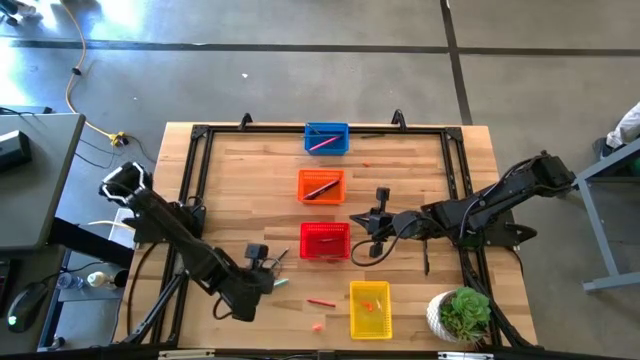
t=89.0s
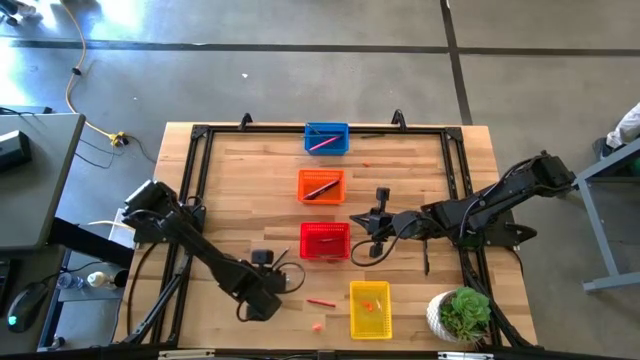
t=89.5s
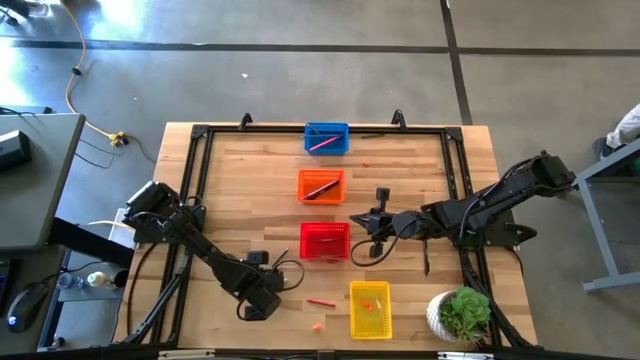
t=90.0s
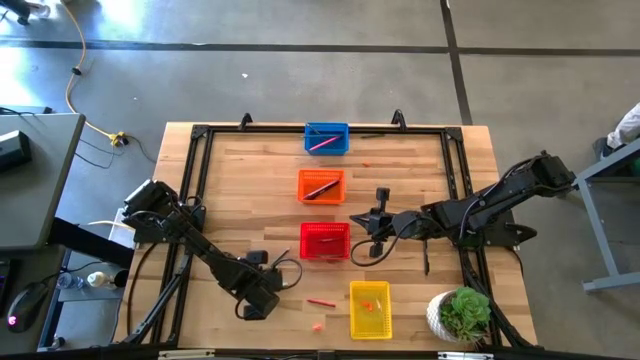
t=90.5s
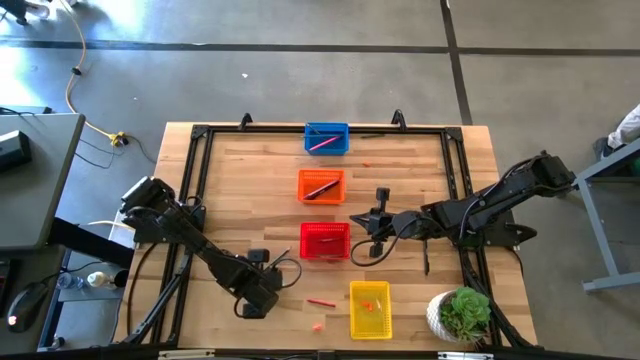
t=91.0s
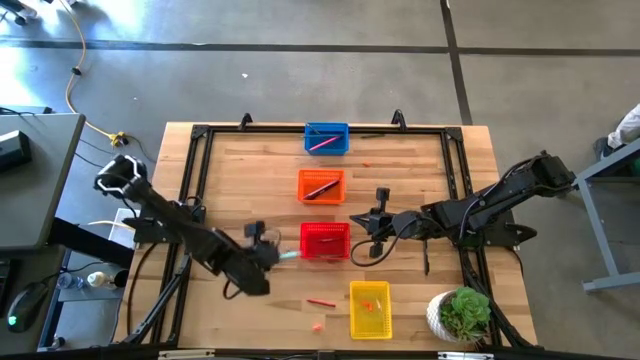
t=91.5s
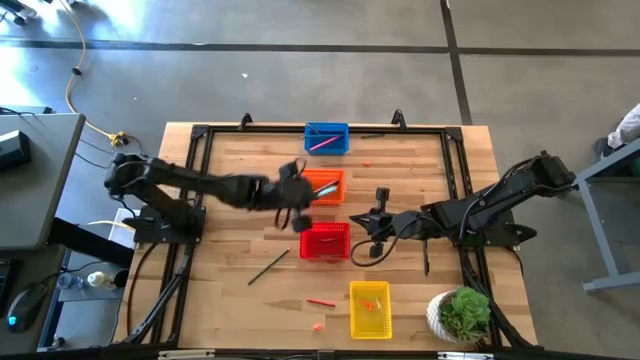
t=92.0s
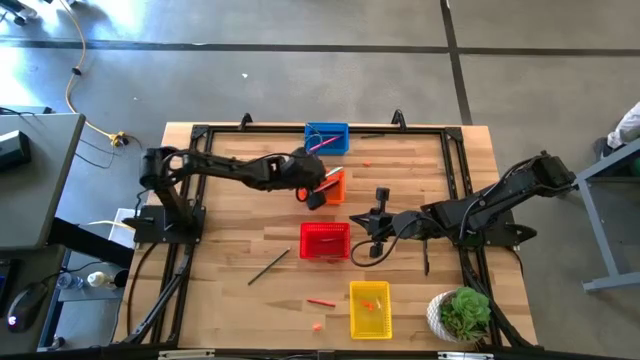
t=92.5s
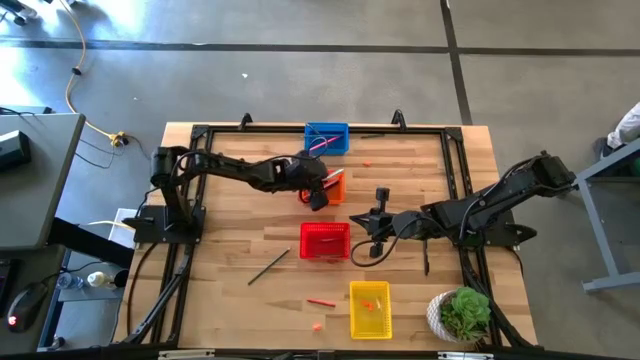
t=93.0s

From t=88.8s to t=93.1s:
Task: Sort crayons/erasers/pens/pencils in bins
Put the blue pen into the orange bin

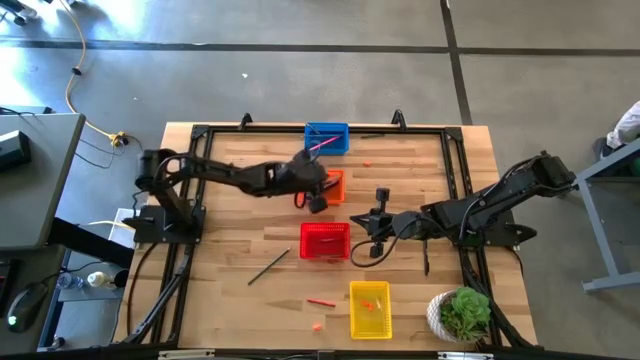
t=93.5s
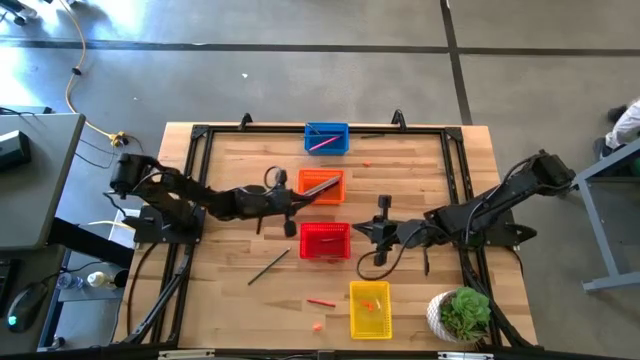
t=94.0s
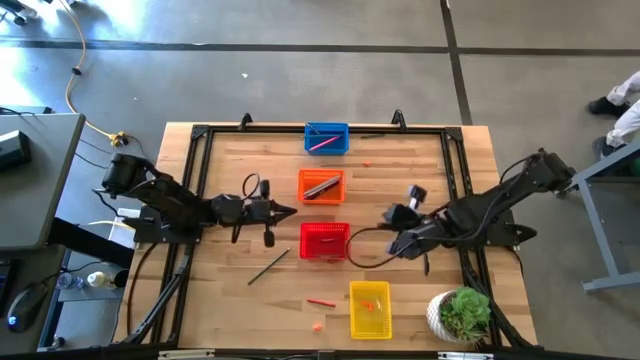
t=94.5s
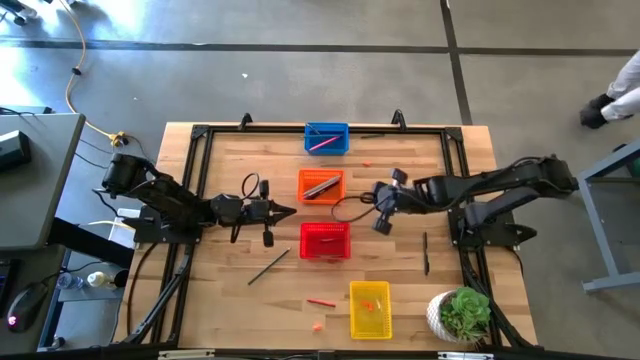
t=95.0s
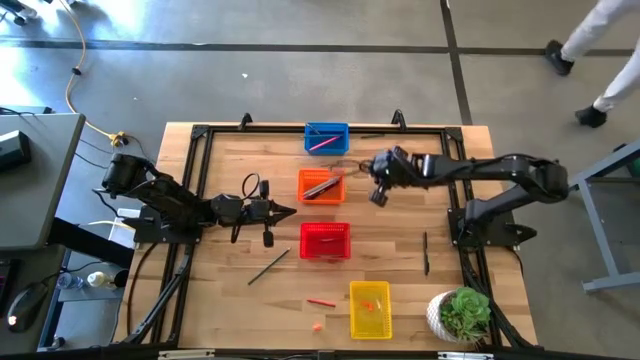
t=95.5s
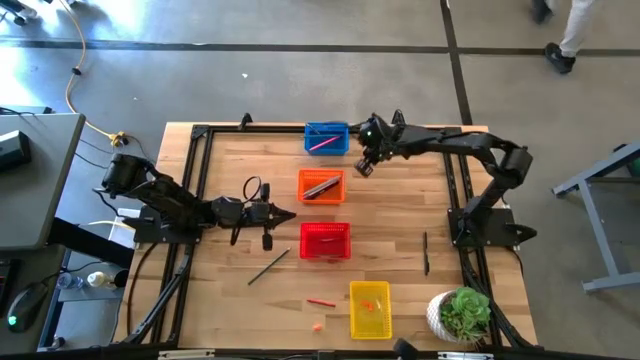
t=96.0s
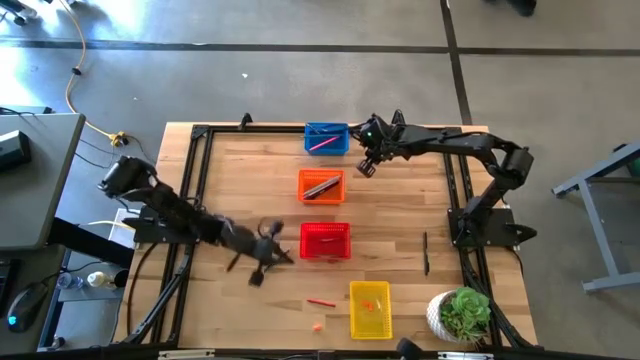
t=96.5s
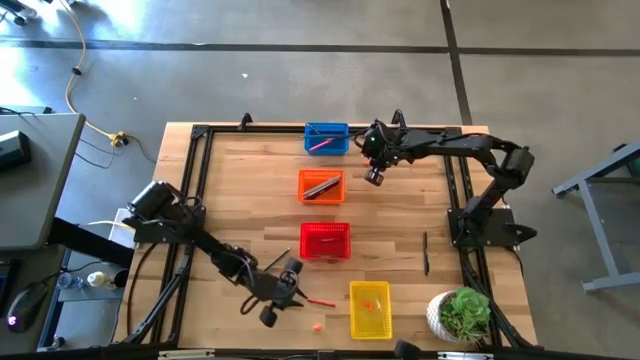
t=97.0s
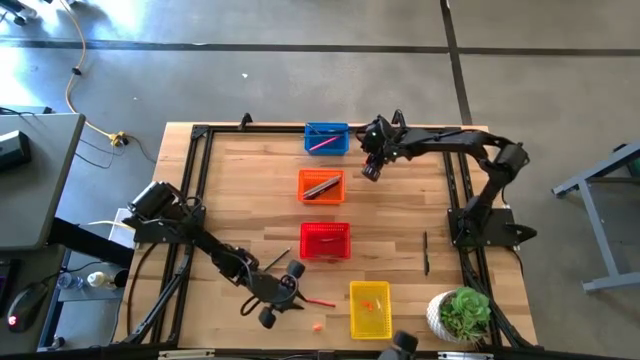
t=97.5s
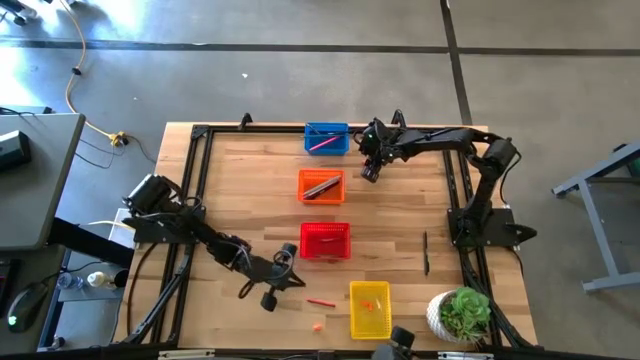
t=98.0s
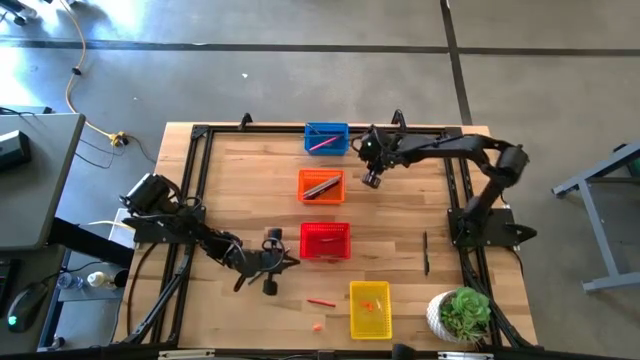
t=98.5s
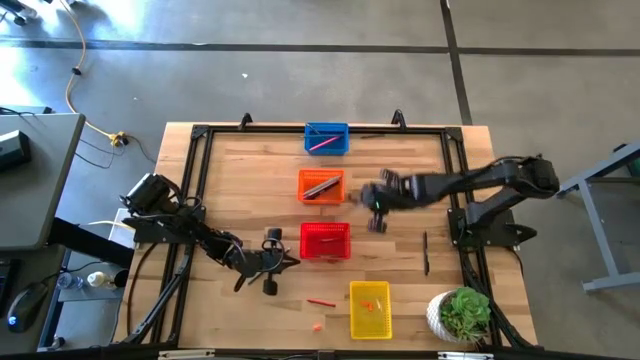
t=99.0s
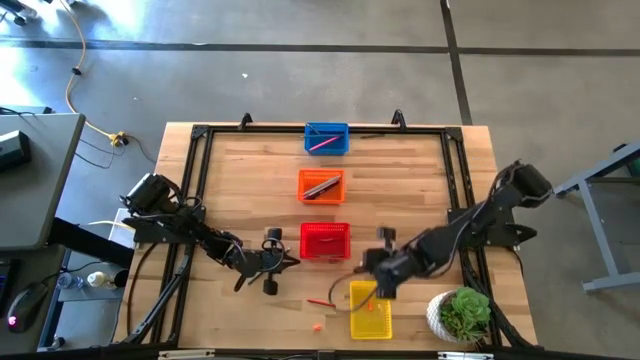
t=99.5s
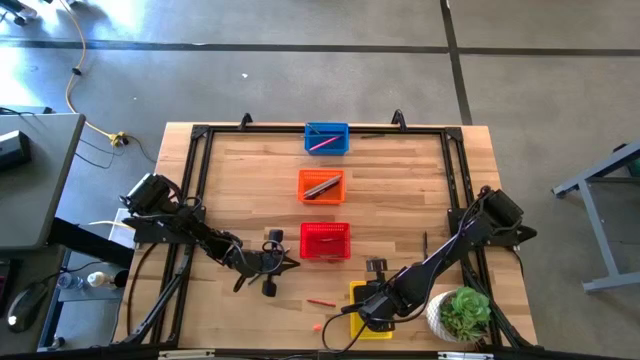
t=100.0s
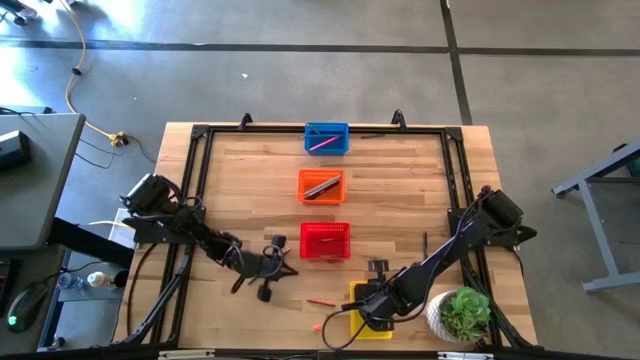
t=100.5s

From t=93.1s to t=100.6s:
Put the orange eraser into the yellow bin

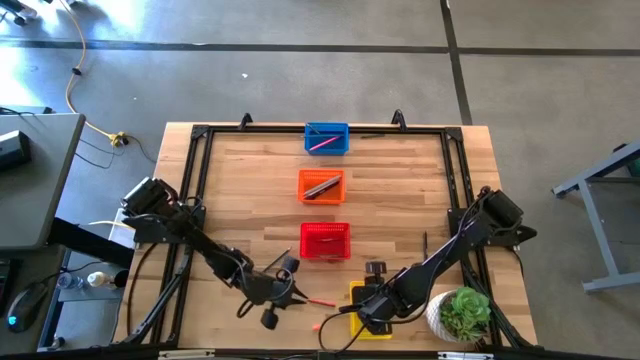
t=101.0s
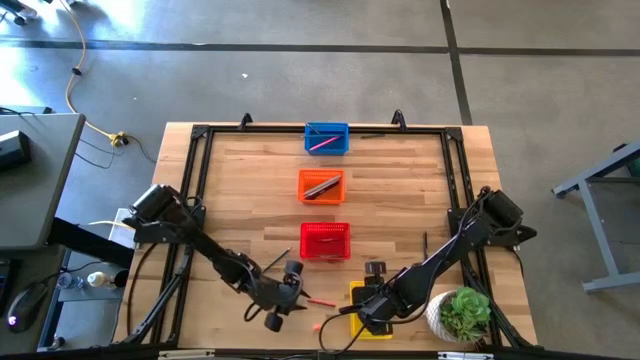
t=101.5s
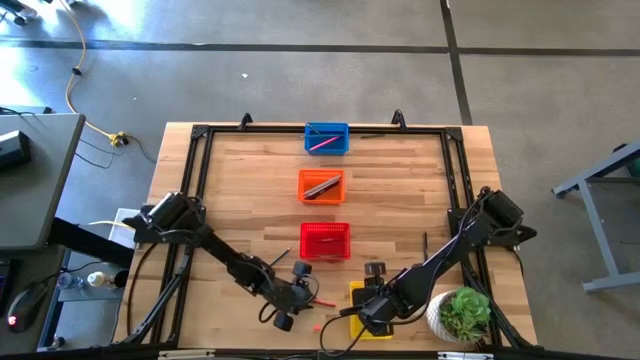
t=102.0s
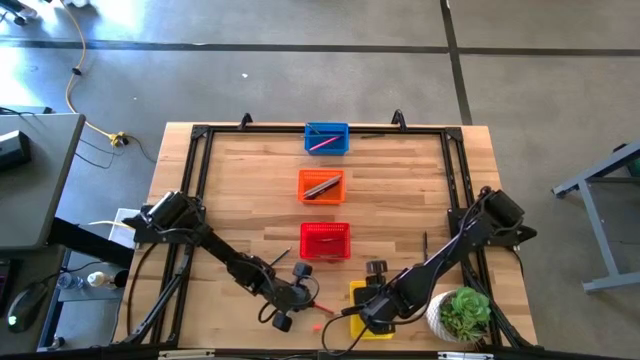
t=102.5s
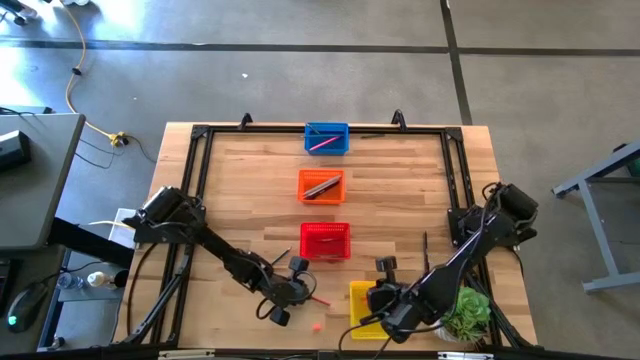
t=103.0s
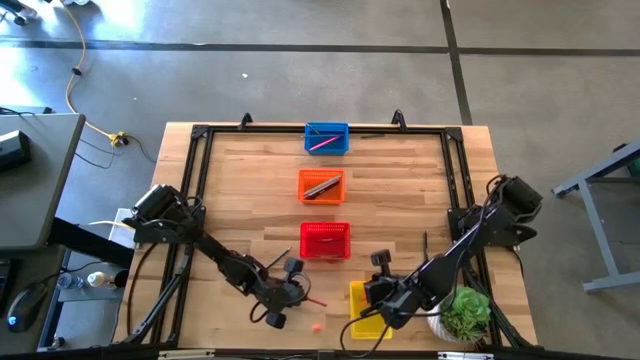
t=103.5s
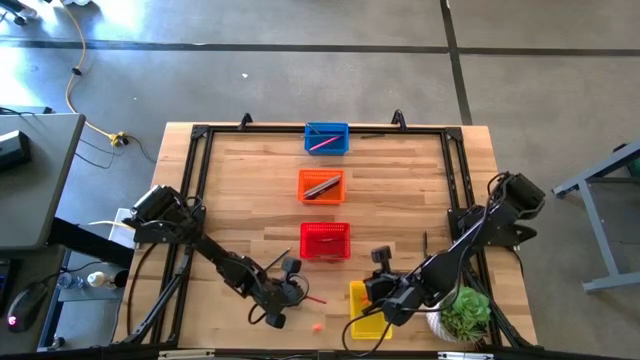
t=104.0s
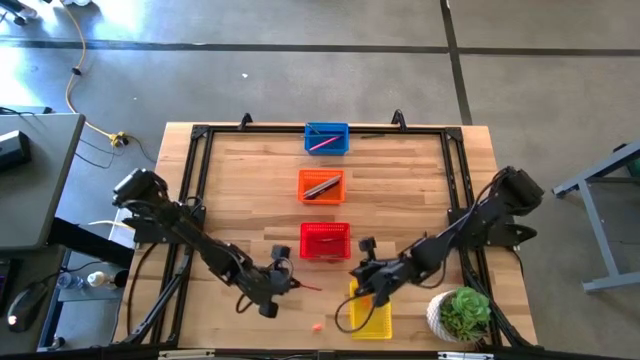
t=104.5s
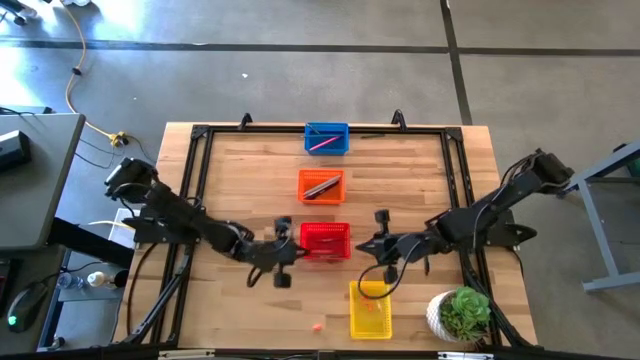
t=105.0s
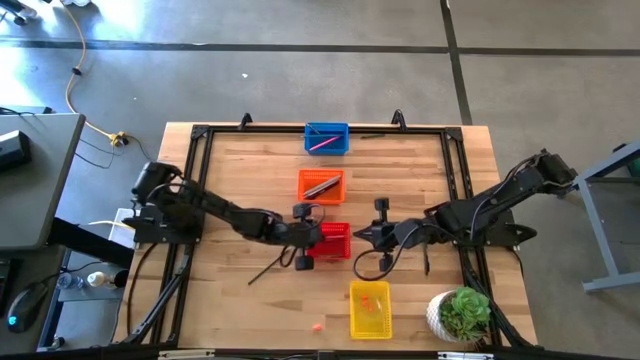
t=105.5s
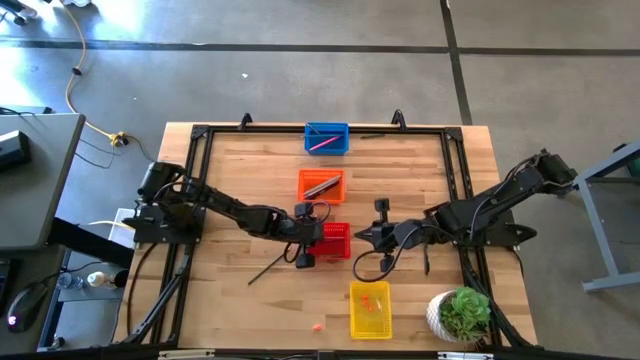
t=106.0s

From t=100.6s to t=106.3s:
Put the red crayon into the red bin

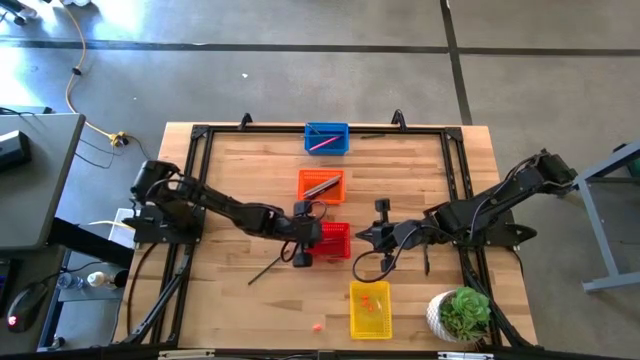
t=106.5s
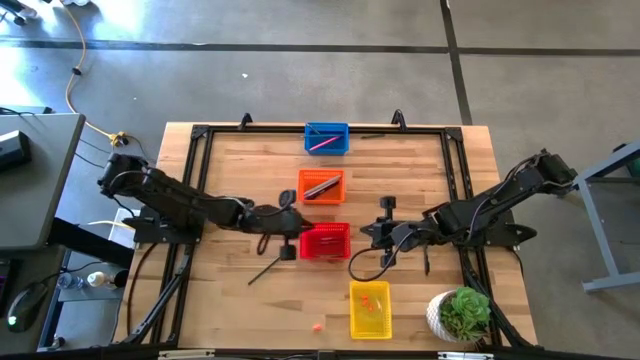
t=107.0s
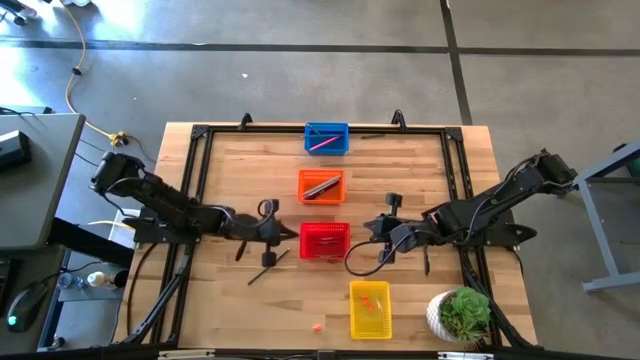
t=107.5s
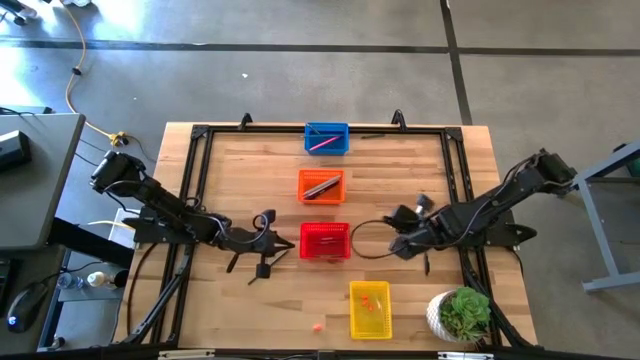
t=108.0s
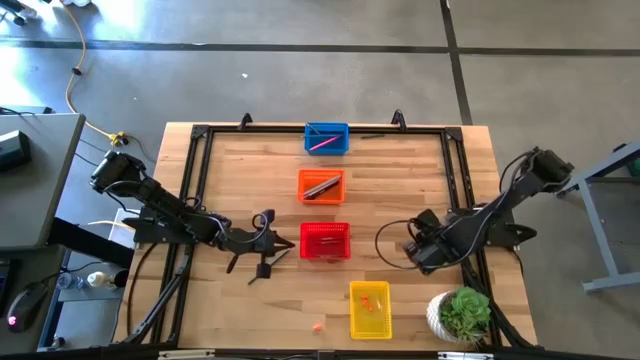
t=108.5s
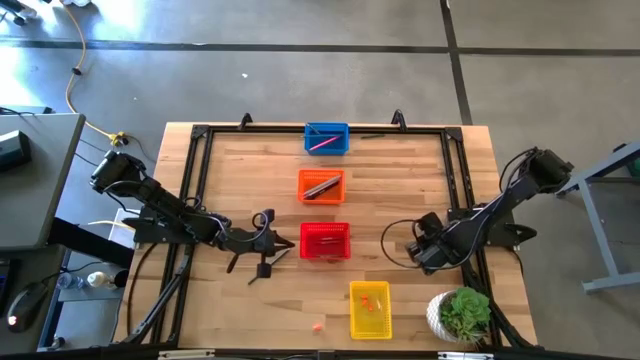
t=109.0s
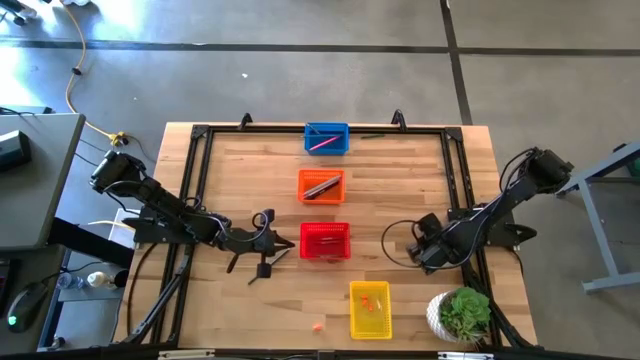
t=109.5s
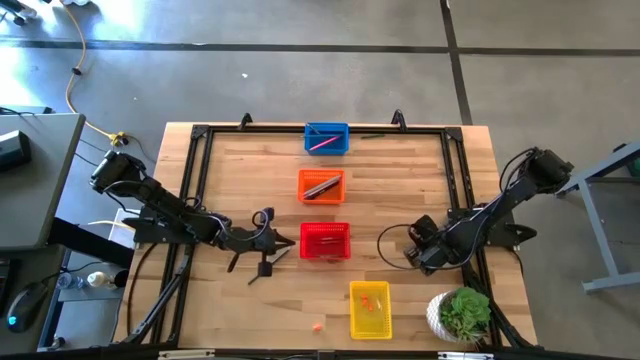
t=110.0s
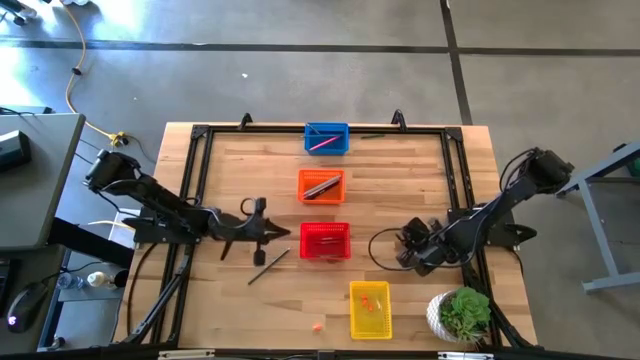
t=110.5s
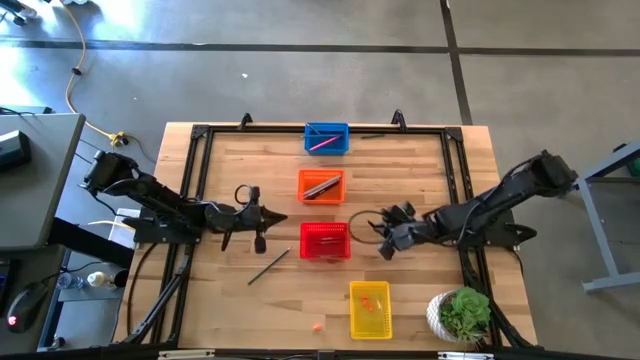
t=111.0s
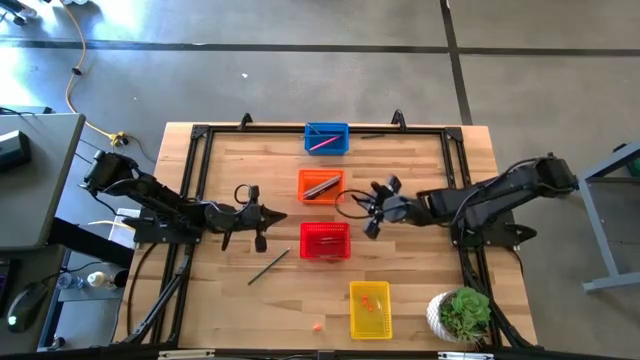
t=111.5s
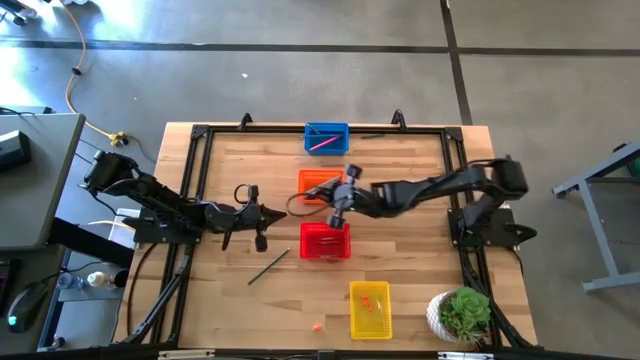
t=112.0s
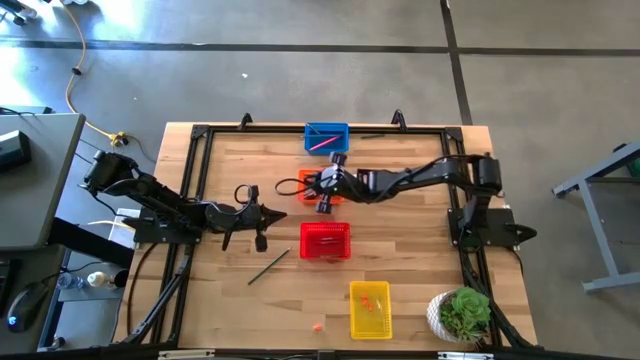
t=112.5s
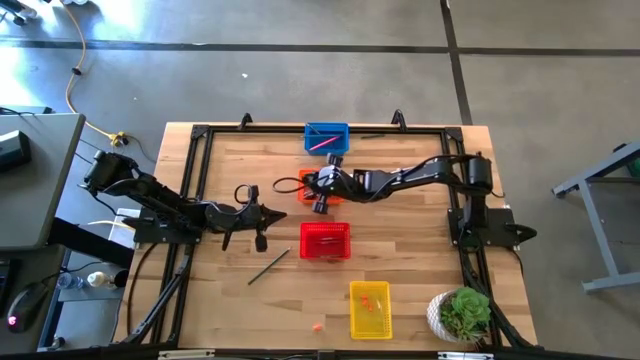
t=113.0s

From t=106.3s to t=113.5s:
Put the black pen into the orange bin
